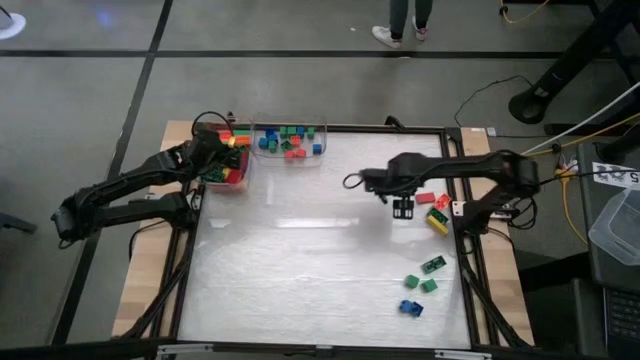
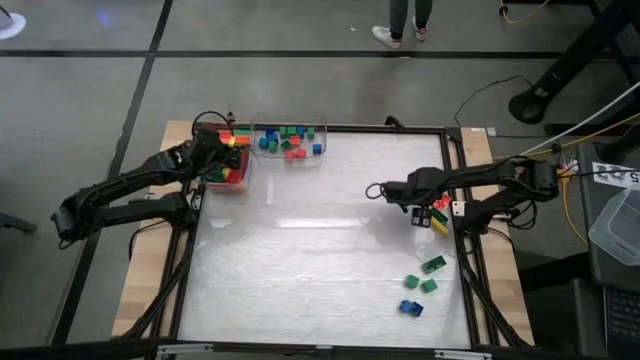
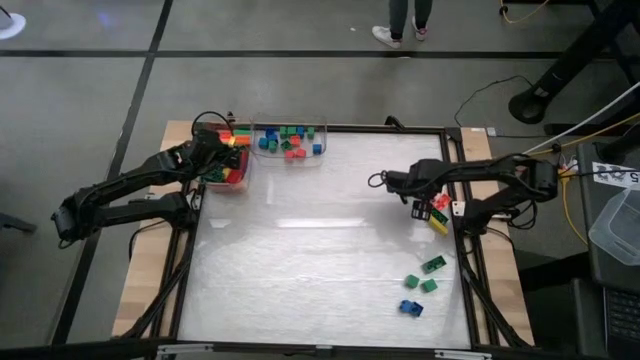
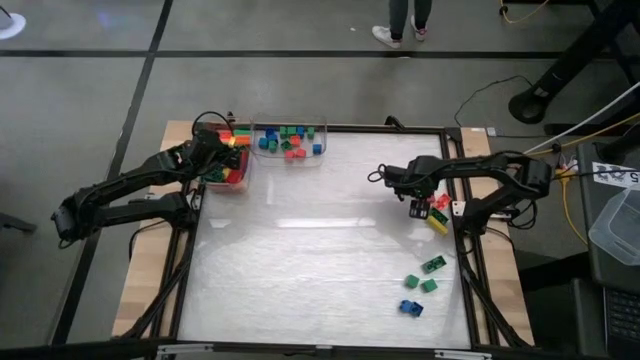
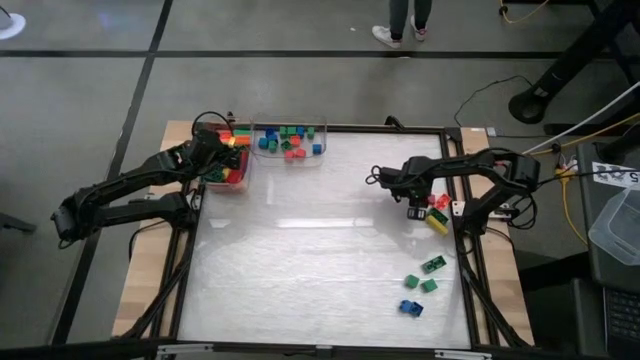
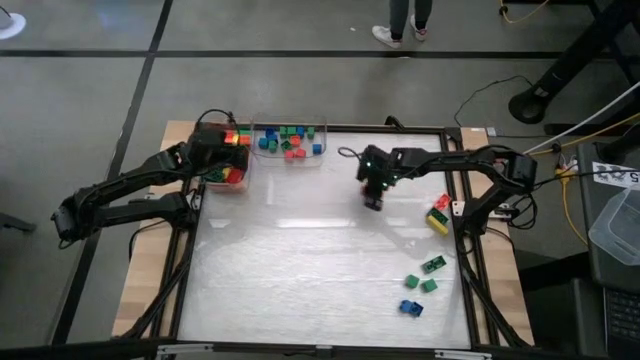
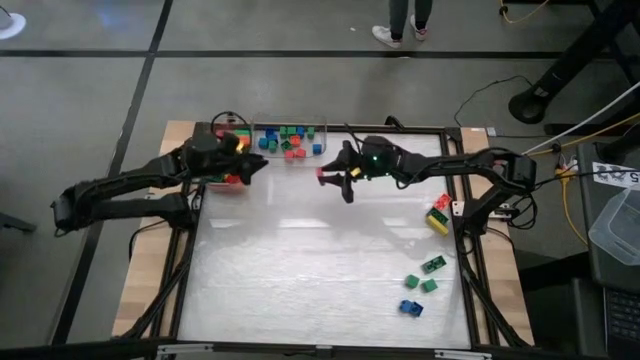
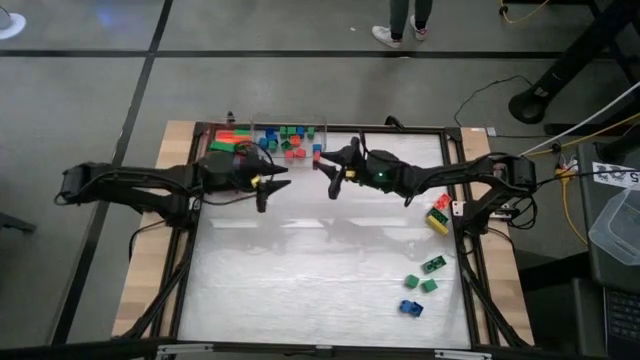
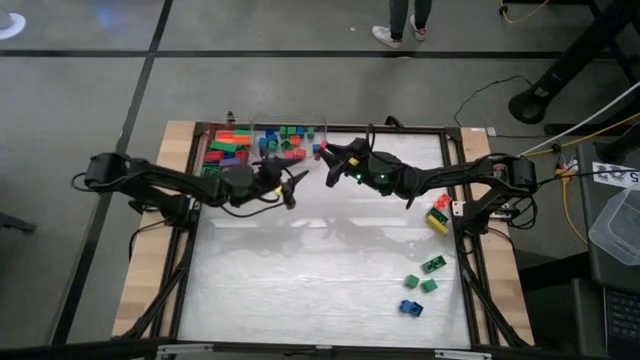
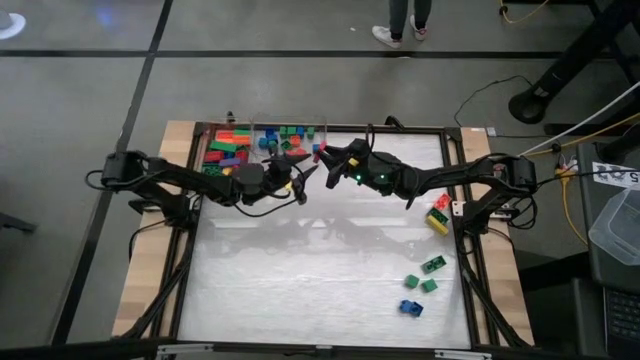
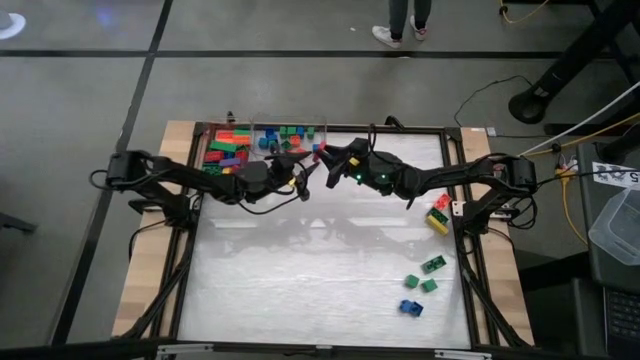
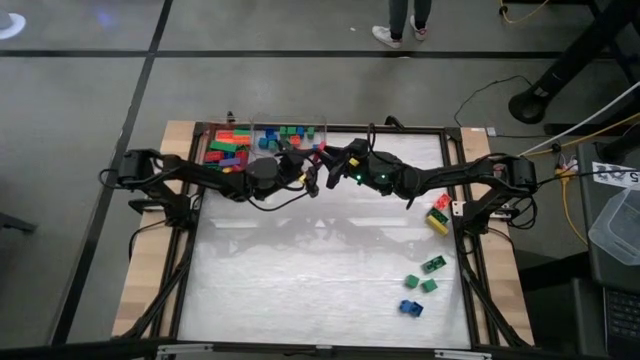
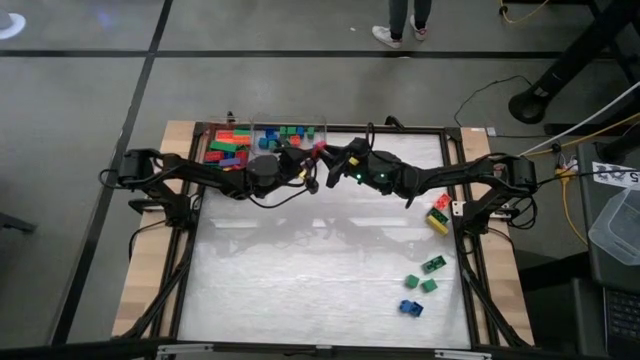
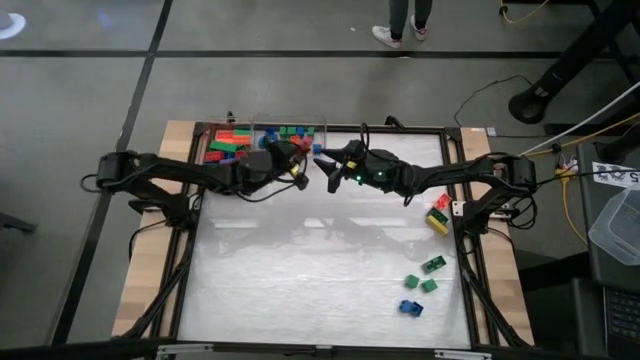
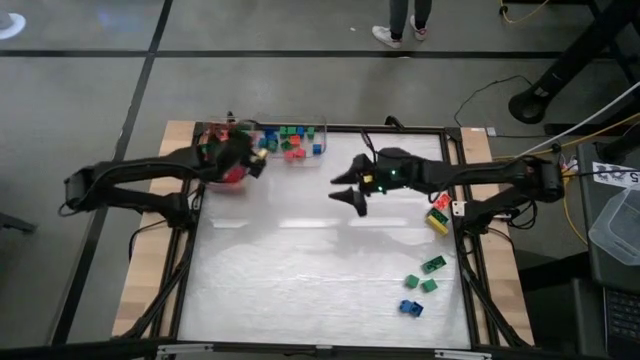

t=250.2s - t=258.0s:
Task: Sort blocks by size
Put the large red block into the left transparent bin

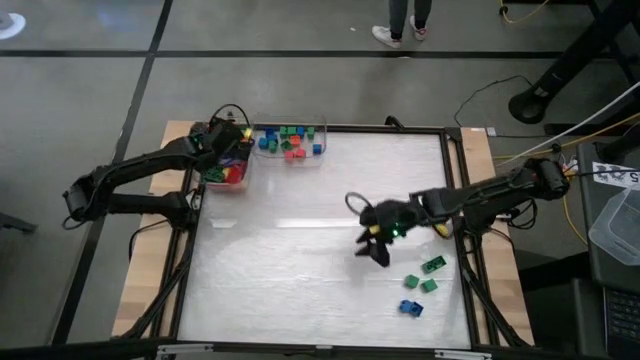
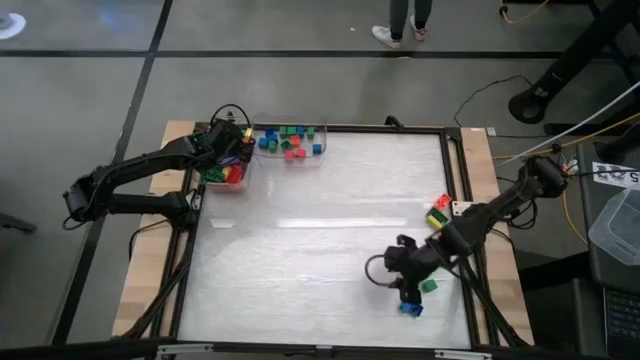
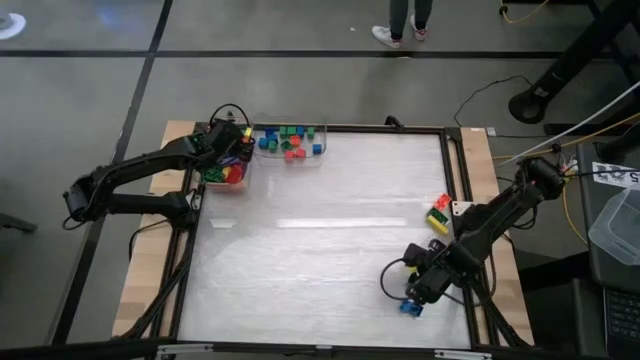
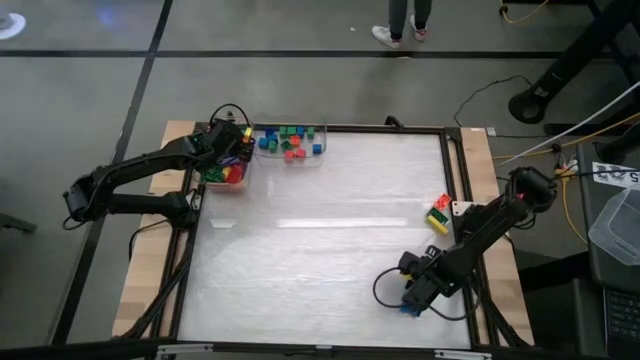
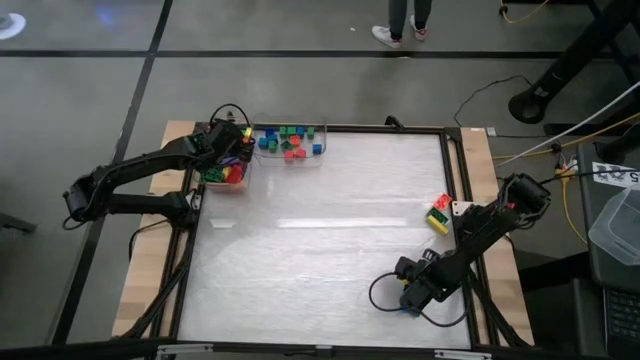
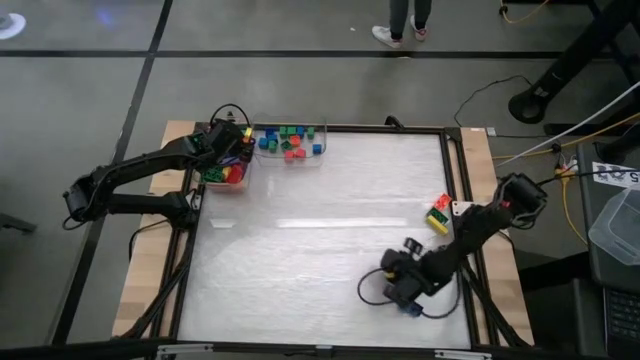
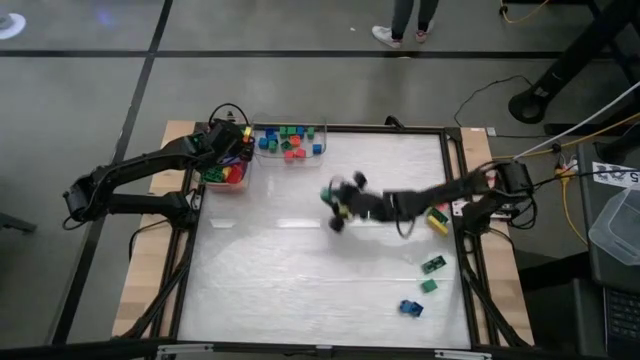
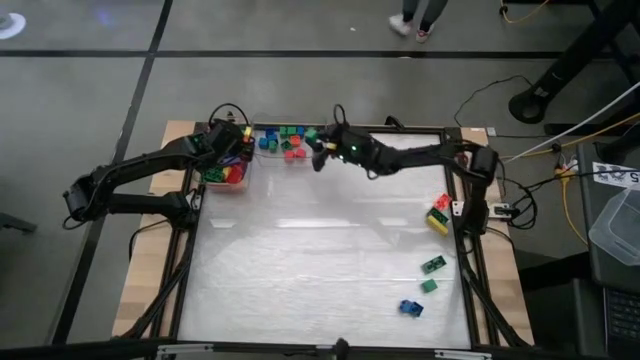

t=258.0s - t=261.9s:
Put the small green block into the right transparent bin

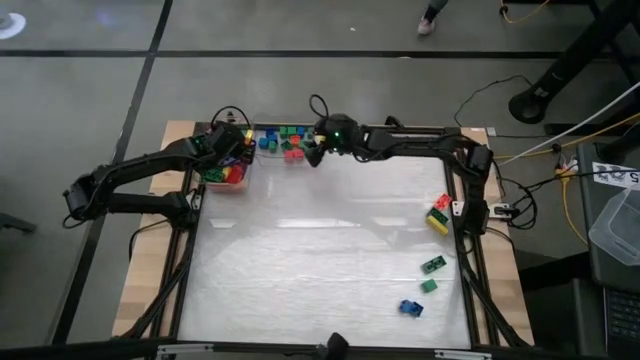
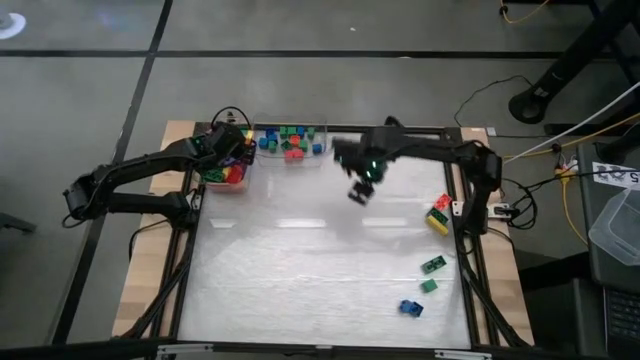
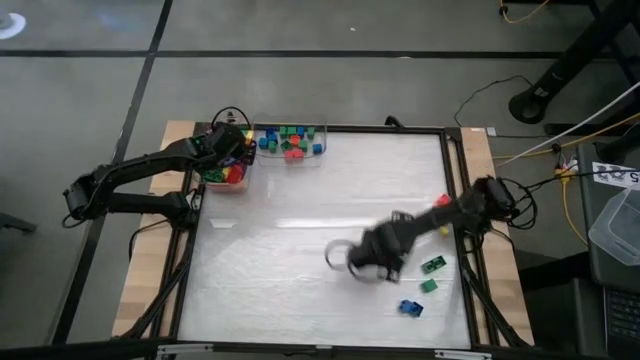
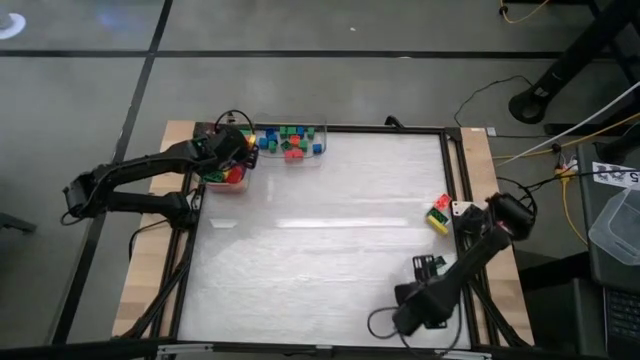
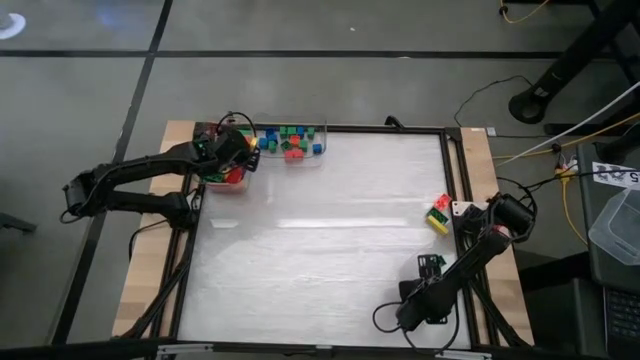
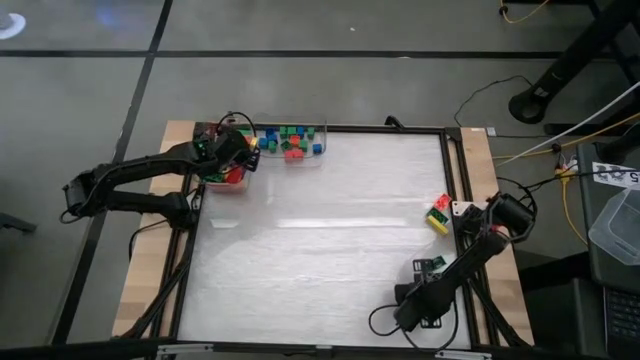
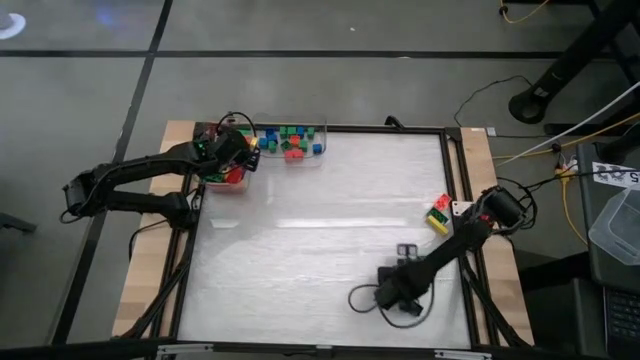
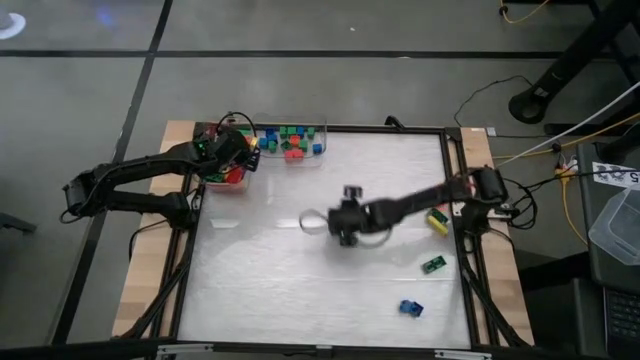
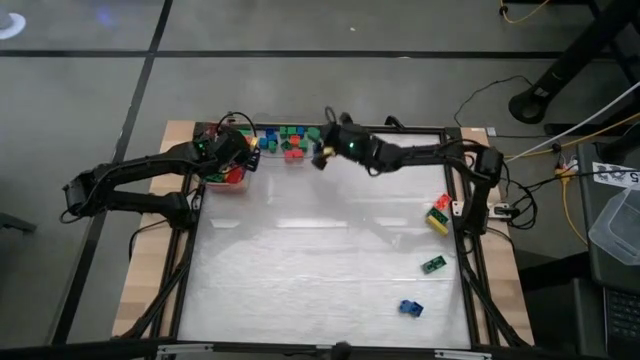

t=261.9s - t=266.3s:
Put the small green block into the right transparent bin

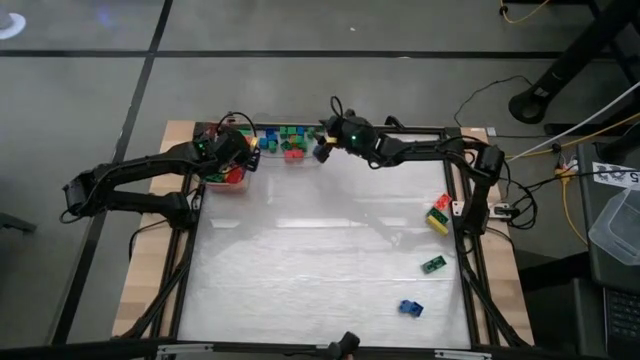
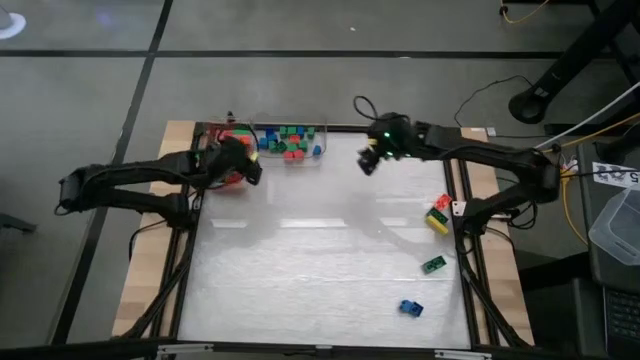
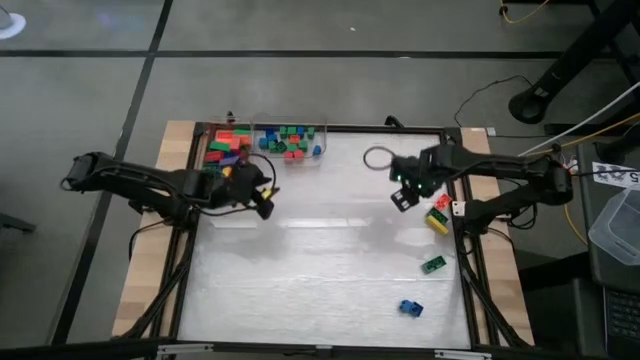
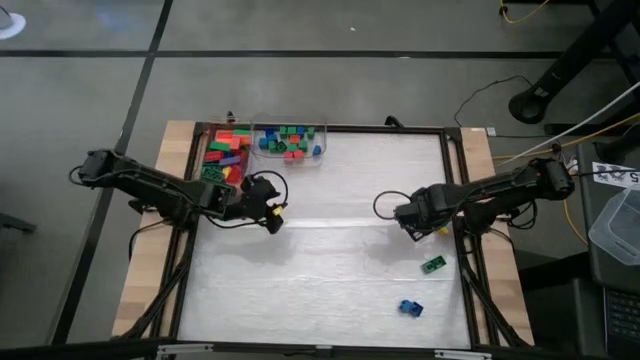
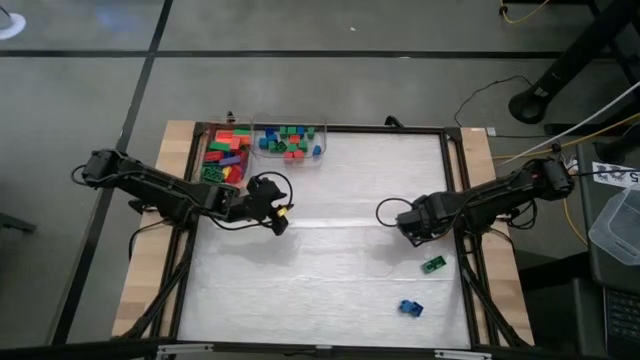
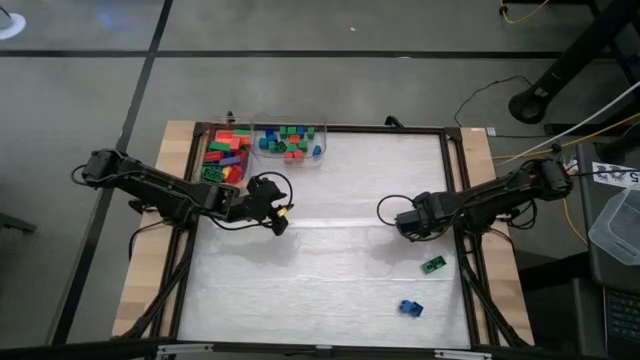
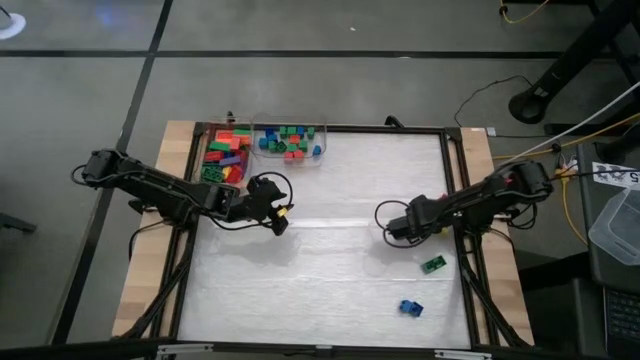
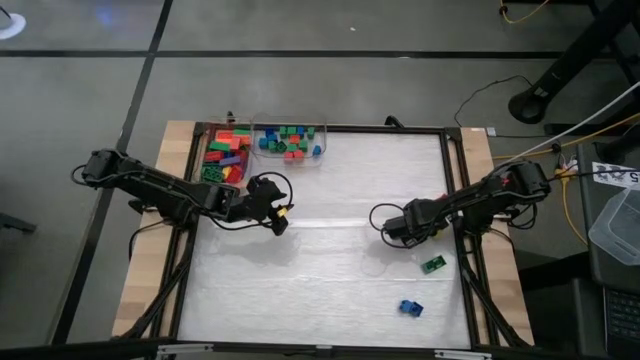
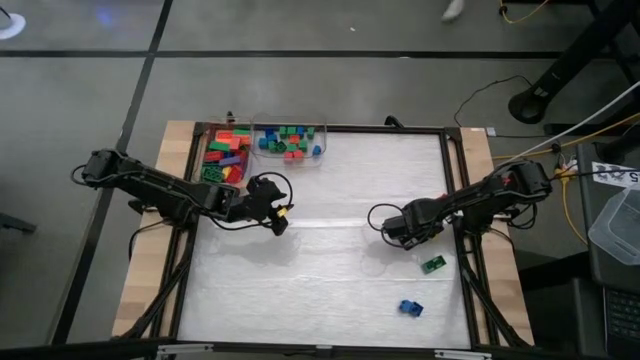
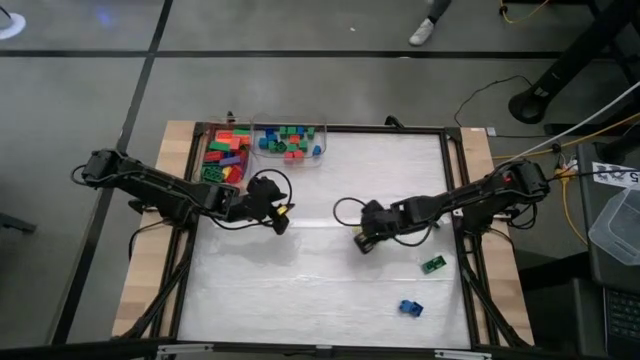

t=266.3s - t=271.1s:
Put the large yellow block into the left transparent bin
